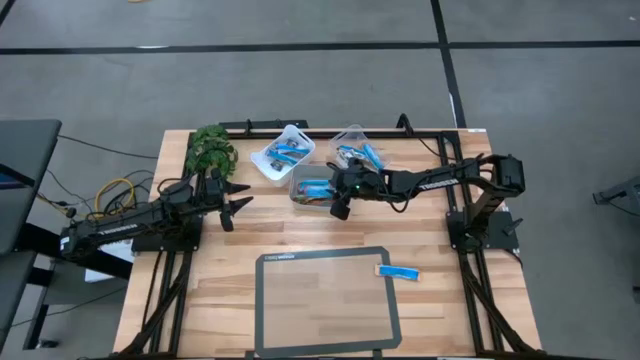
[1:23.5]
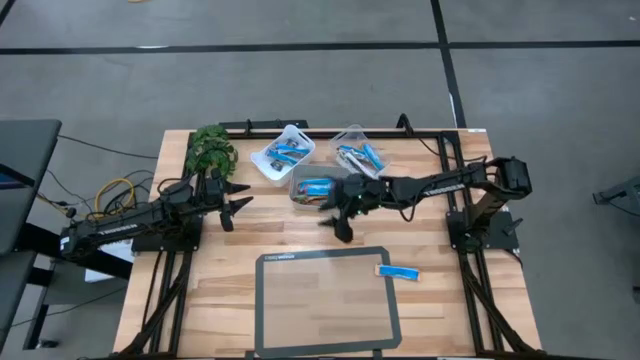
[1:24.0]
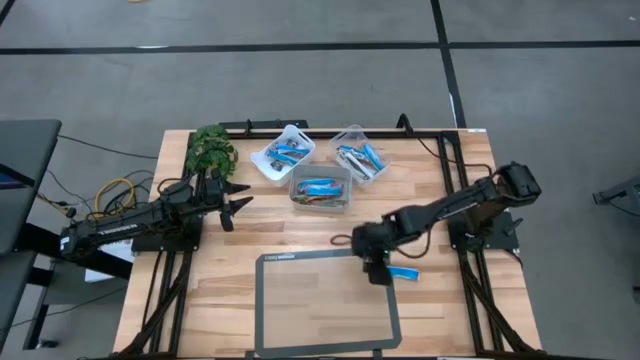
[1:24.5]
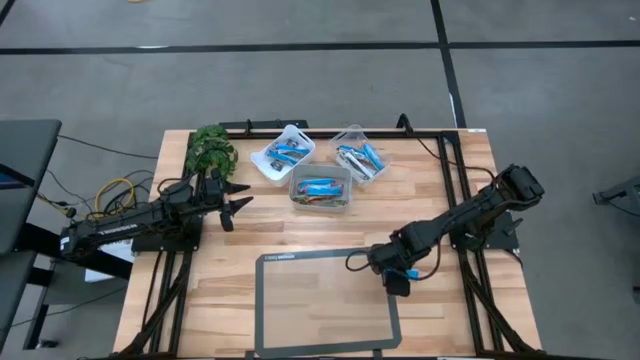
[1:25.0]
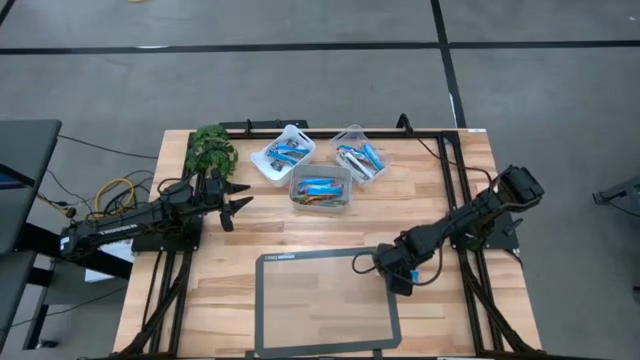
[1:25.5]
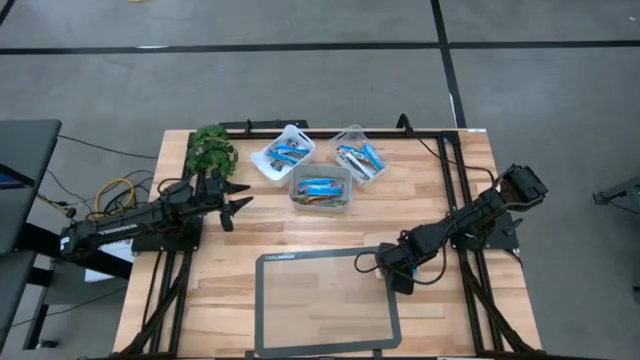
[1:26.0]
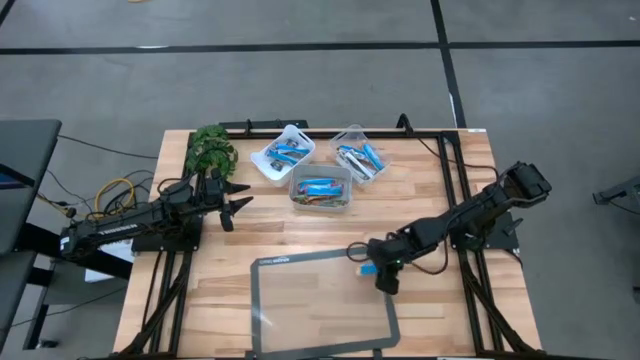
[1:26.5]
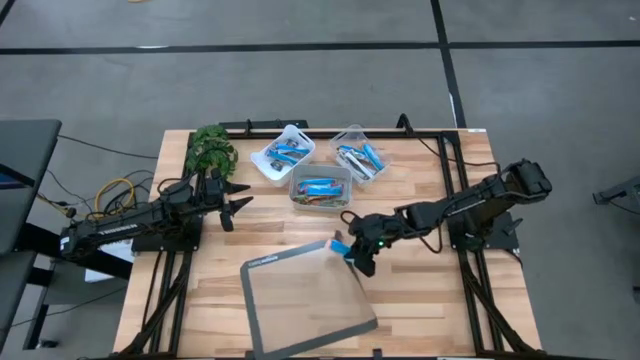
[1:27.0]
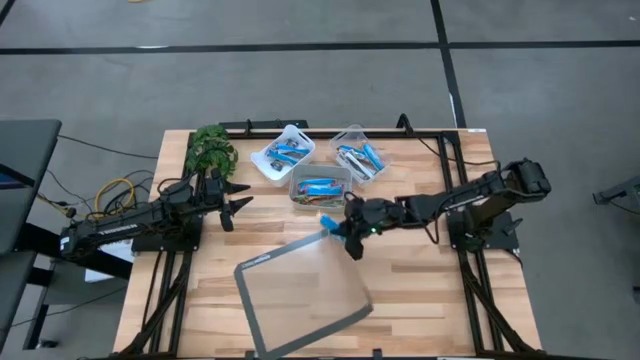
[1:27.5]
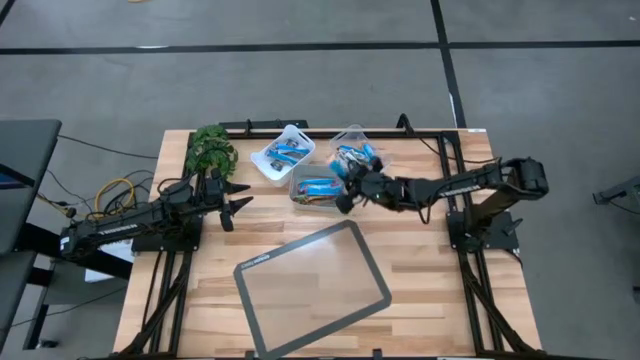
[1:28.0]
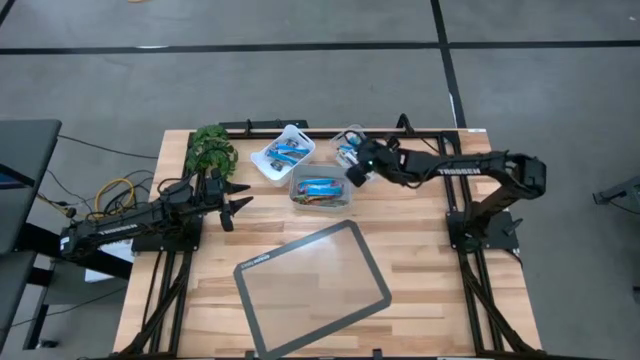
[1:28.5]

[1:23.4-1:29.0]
Task: Pick and place Granola Bars by type
Put the yellow granola bar into the transparent bin

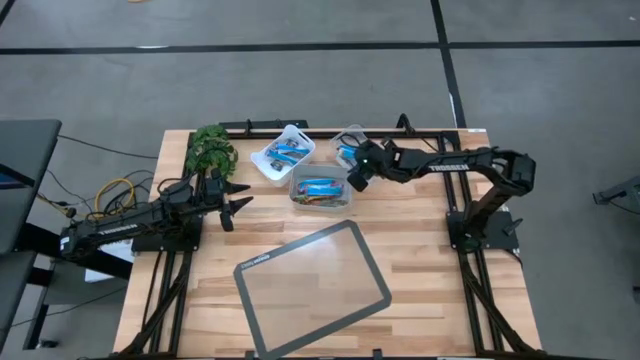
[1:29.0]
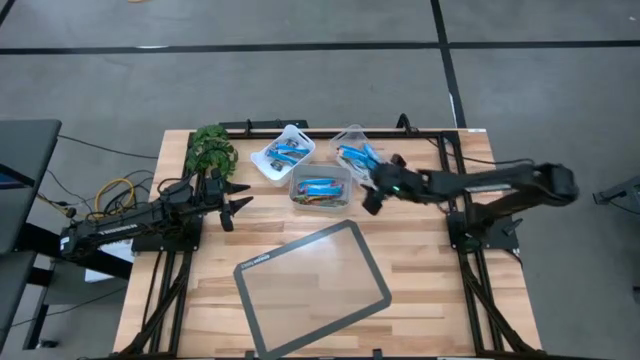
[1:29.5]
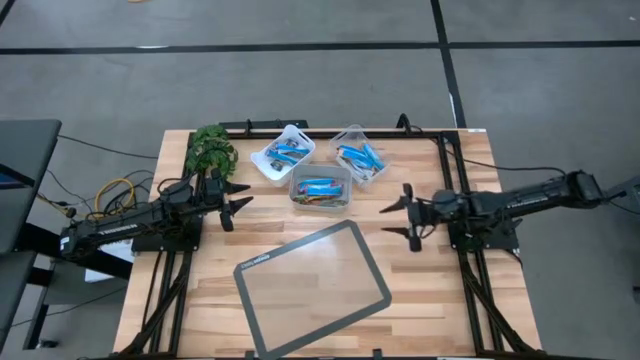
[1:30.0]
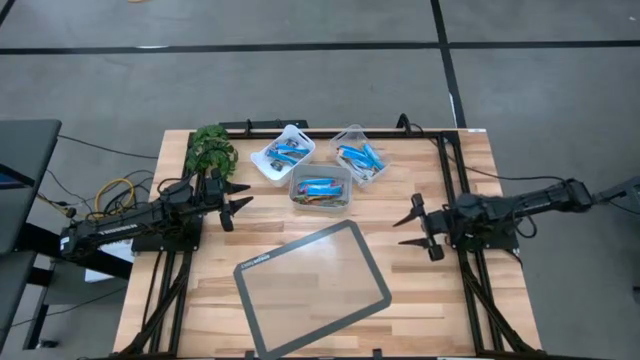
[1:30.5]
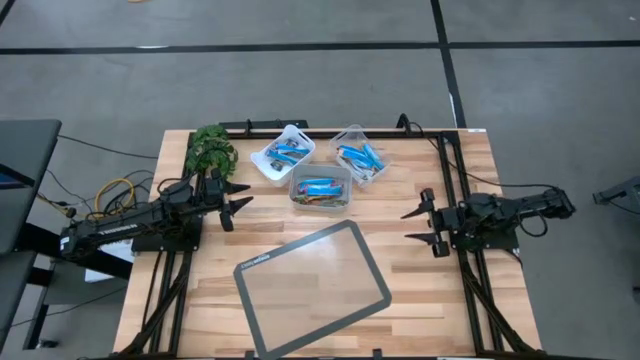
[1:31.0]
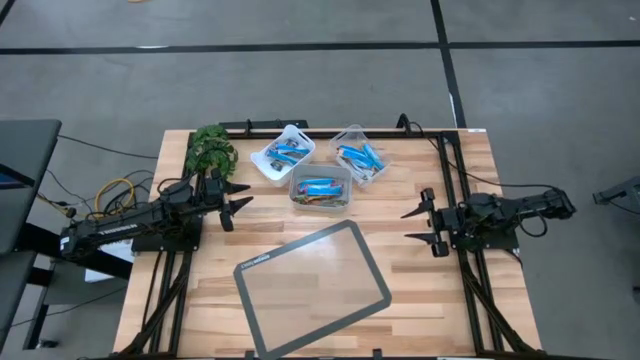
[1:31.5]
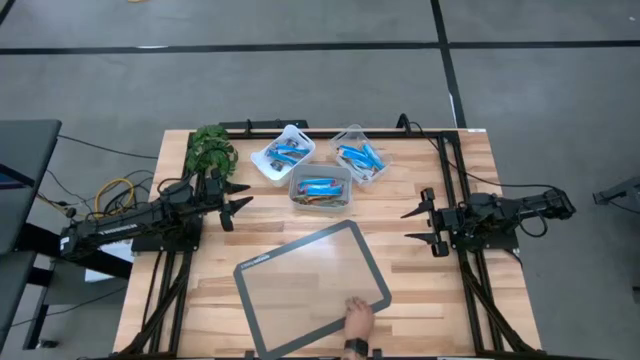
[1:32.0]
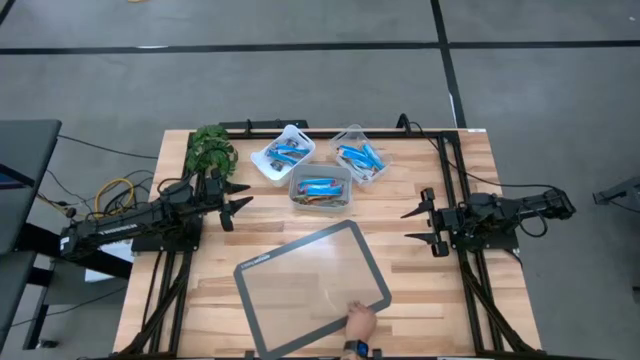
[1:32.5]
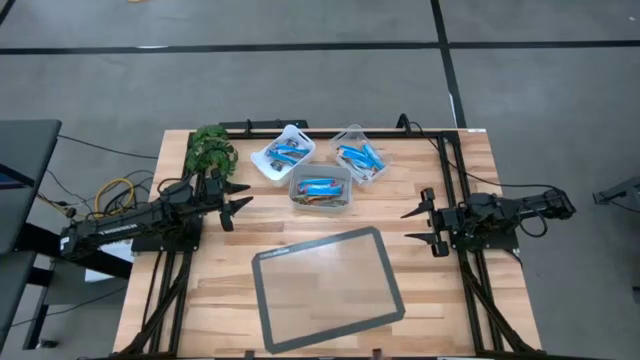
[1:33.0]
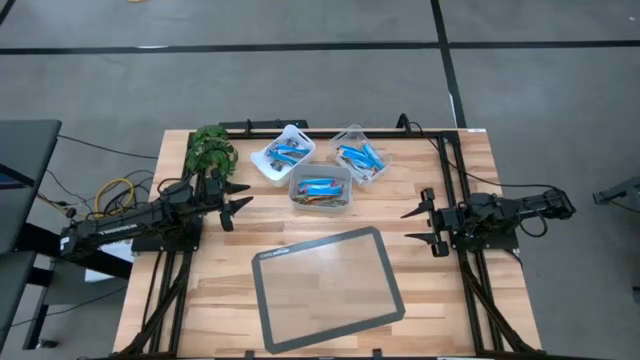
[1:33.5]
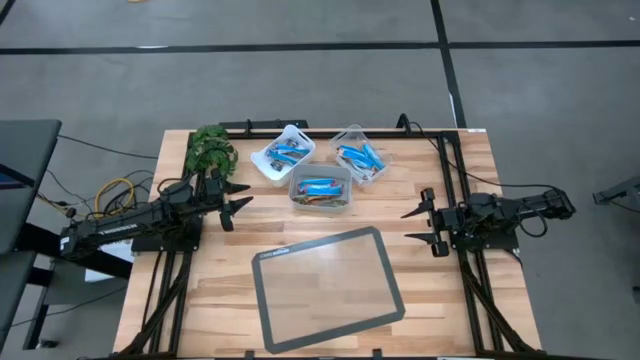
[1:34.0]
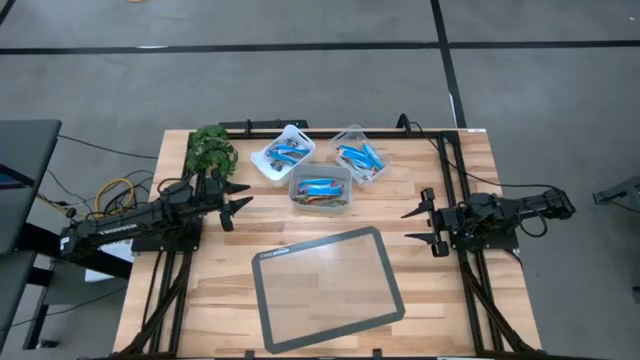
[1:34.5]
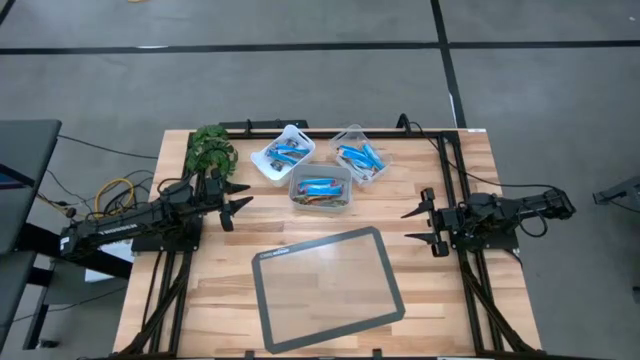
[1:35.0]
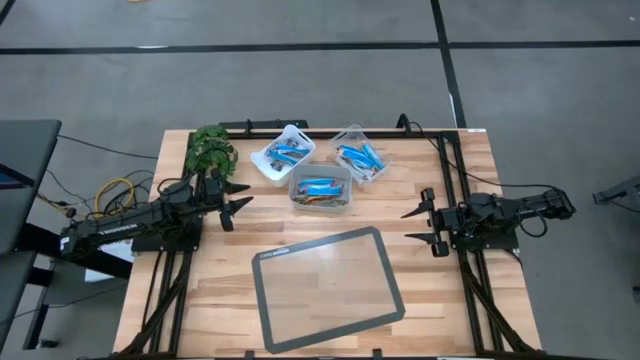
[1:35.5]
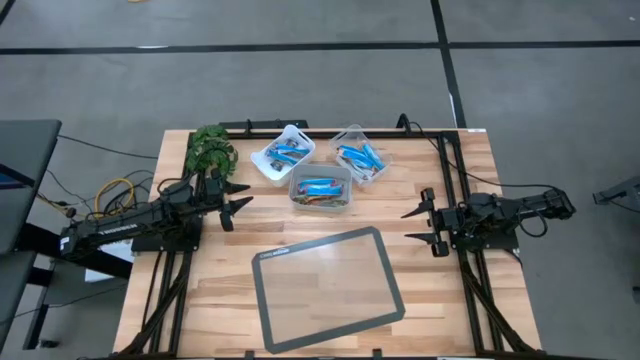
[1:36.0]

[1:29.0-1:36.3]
Return to Home Position

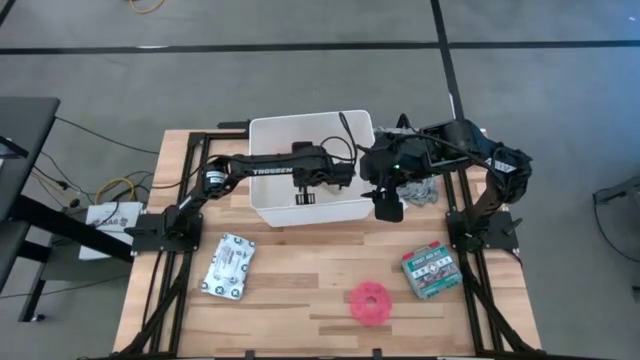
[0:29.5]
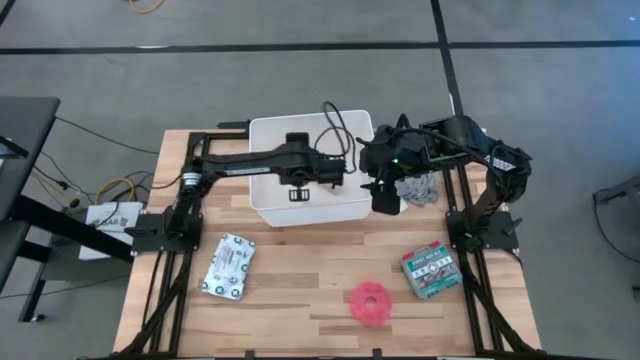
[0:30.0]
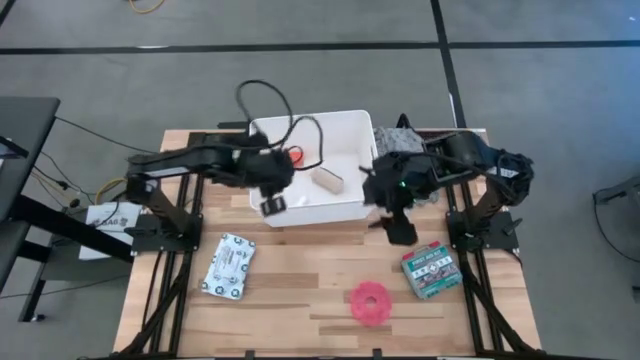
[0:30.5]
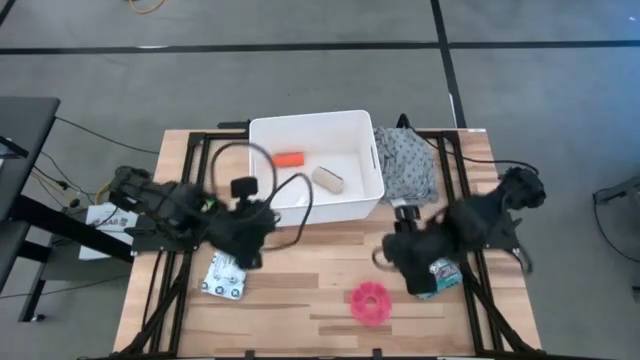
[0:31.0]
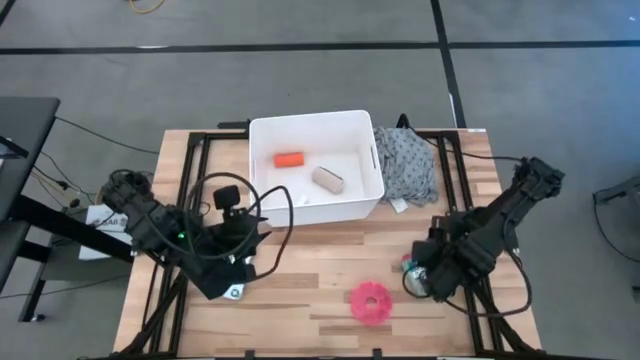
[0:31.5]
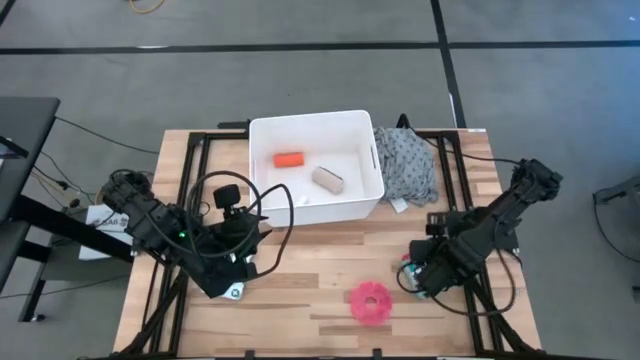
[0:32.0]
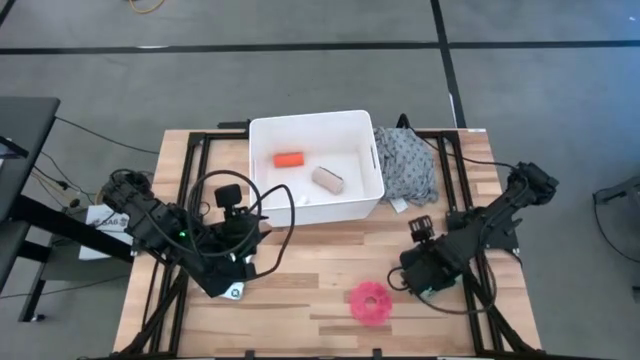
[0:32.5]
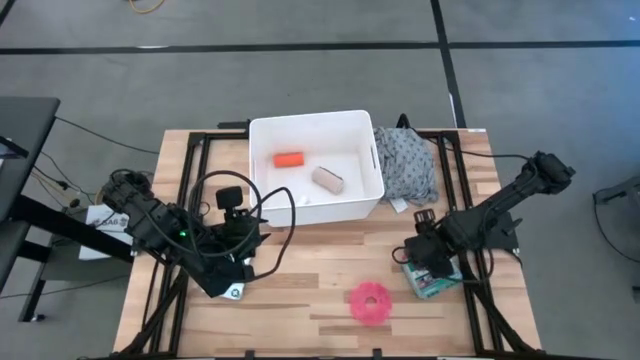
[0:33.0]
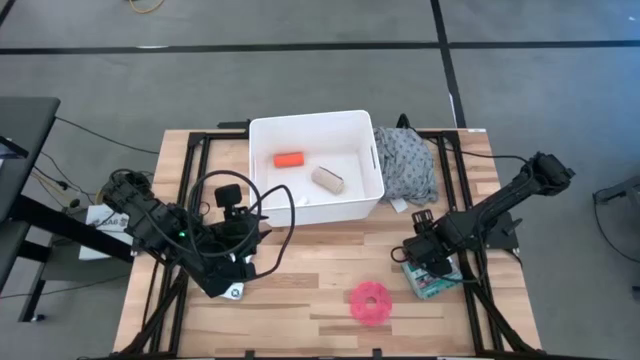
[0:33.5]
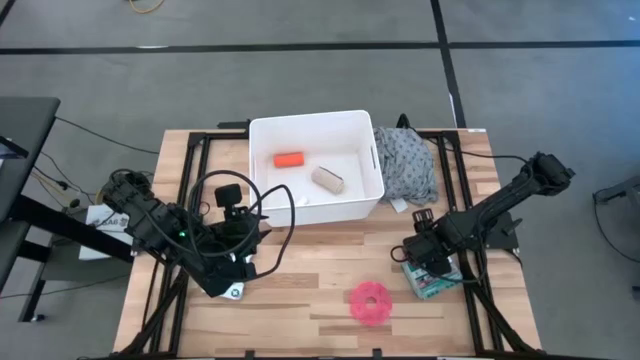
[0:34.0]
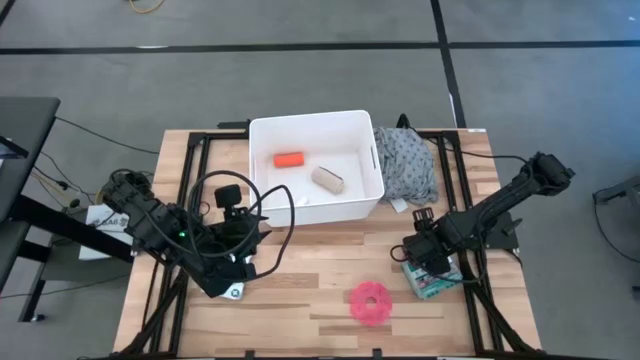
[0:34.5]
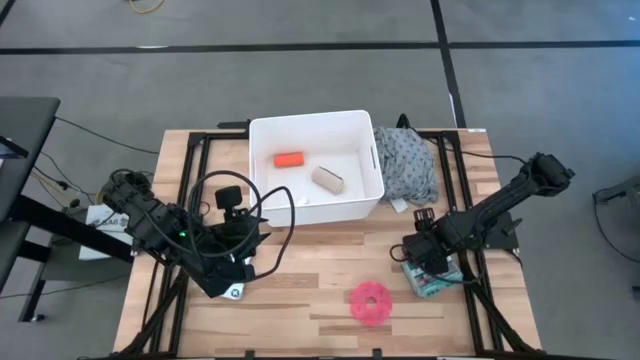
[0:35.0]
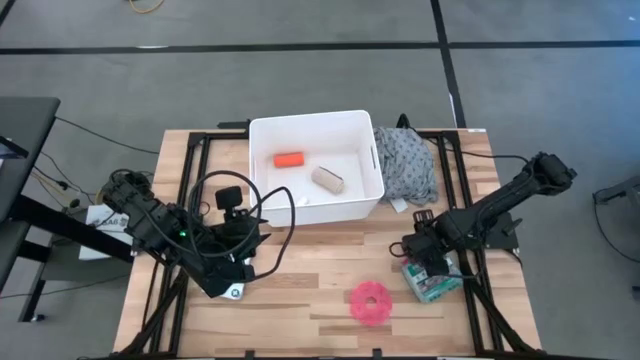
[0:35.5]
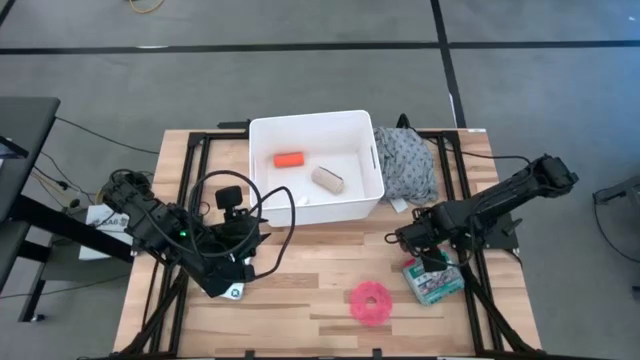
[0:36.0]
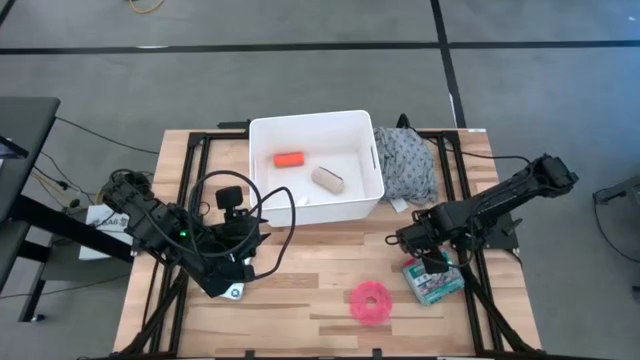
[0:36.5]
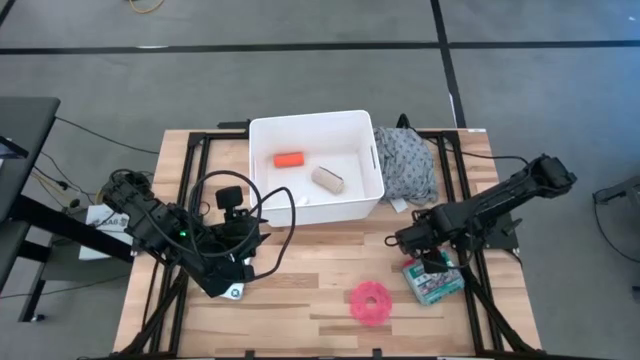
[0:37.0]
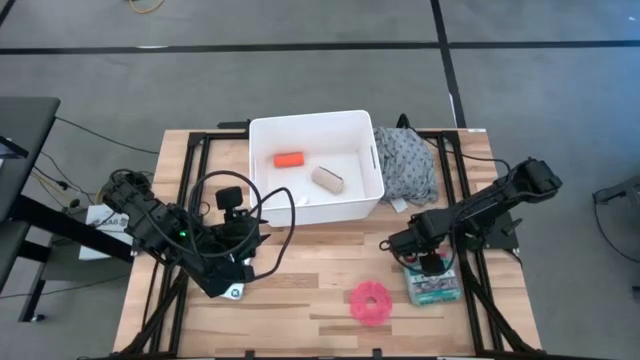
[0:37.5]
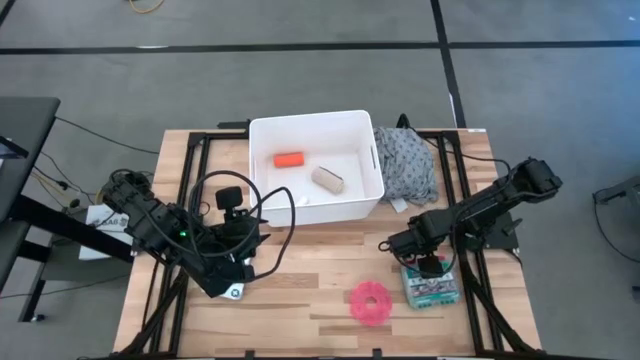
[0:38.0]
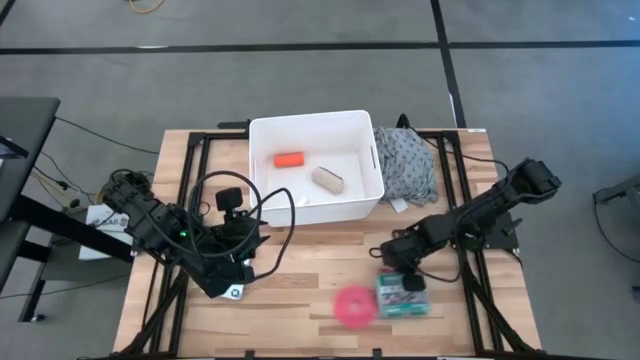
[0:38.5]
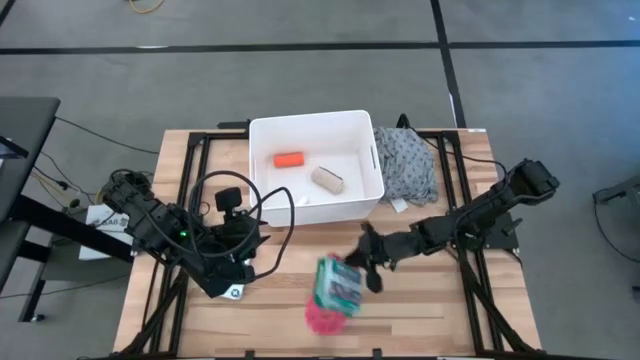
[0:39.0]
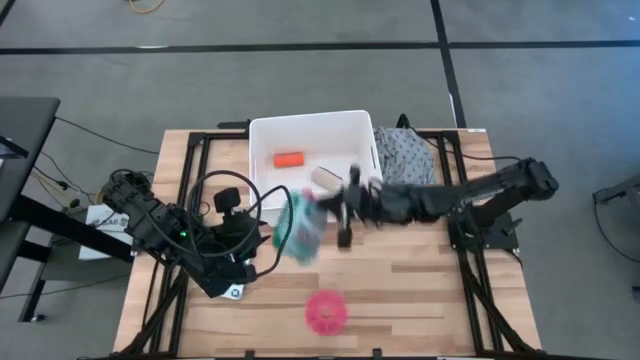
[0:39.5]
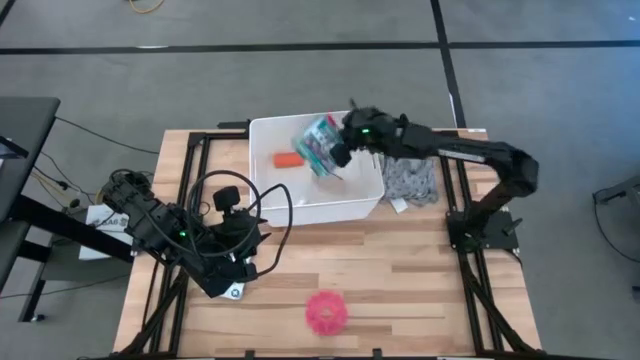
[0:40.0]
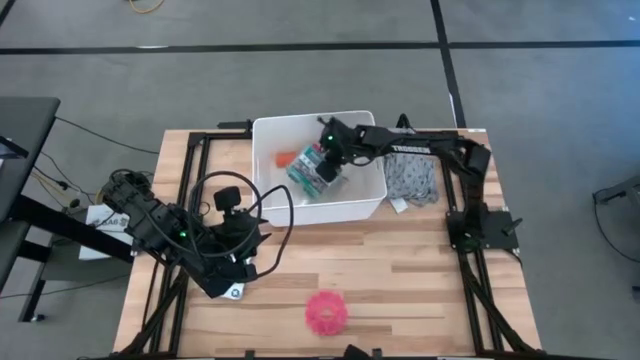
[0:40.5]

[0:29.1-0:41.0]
Task: Pick & place medical supplies in basket/bin
Put the first aid kit into the white bin
